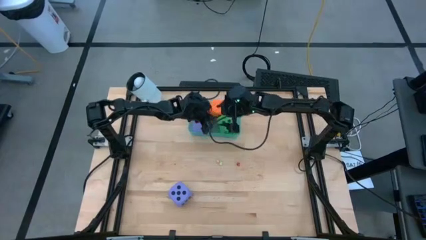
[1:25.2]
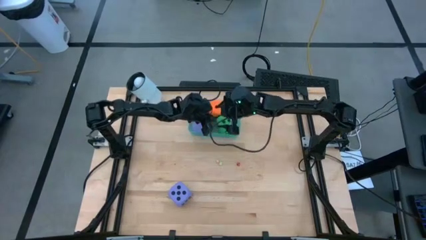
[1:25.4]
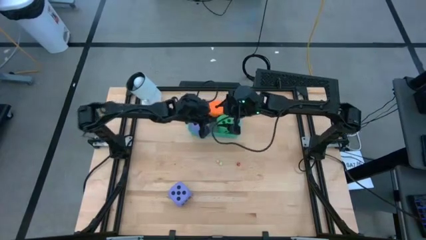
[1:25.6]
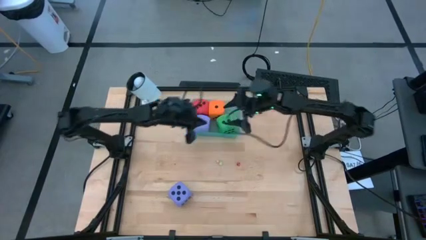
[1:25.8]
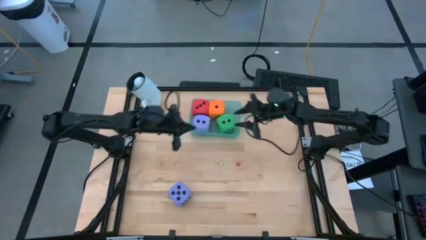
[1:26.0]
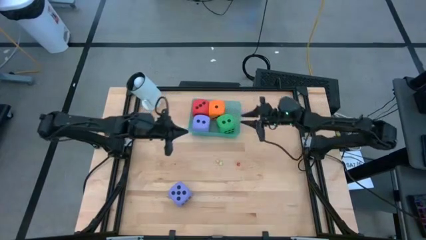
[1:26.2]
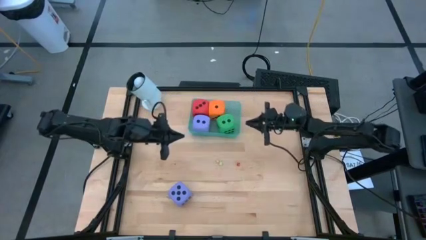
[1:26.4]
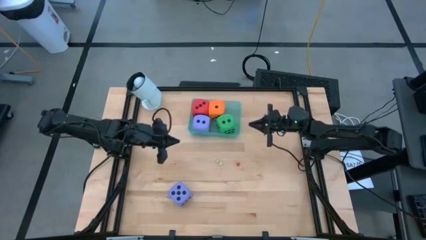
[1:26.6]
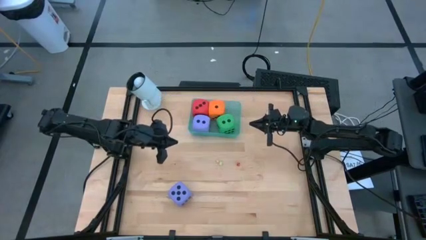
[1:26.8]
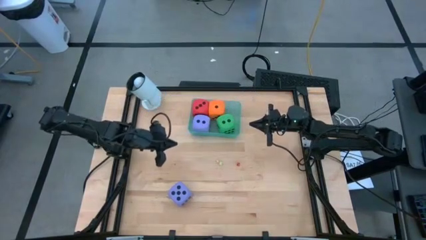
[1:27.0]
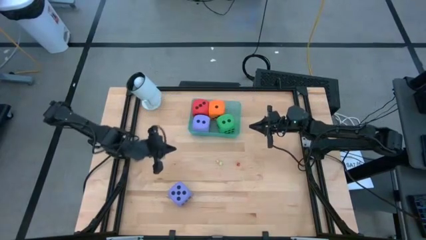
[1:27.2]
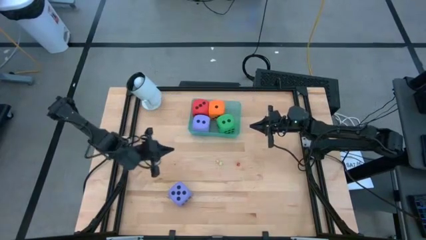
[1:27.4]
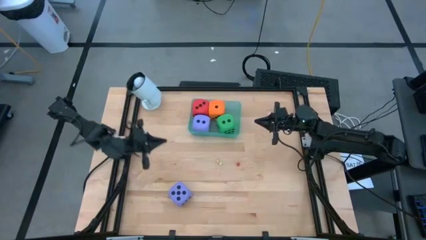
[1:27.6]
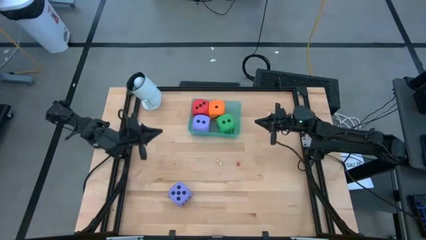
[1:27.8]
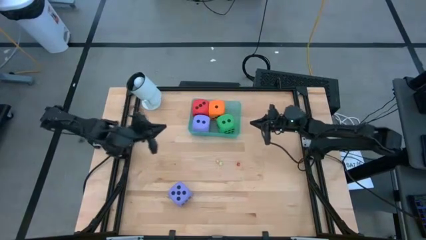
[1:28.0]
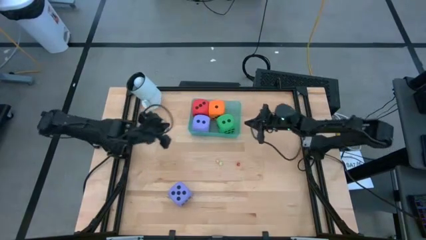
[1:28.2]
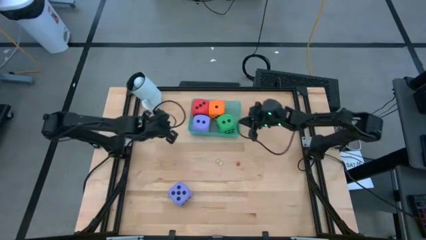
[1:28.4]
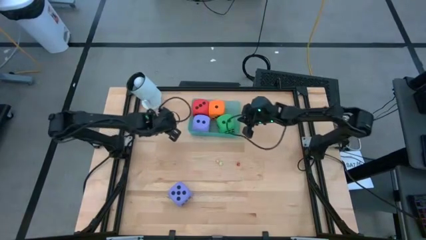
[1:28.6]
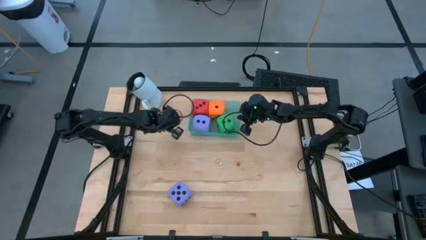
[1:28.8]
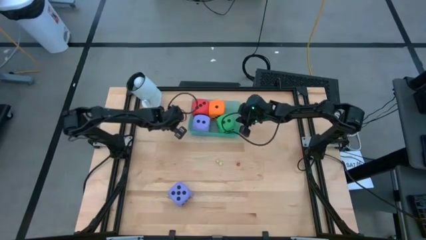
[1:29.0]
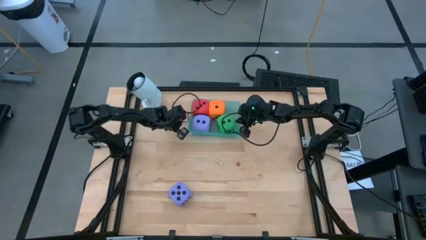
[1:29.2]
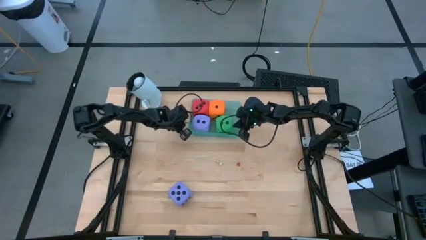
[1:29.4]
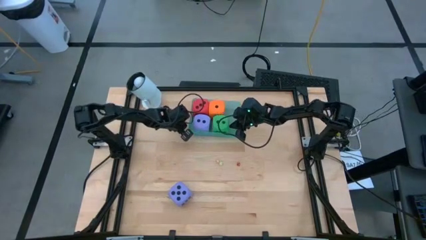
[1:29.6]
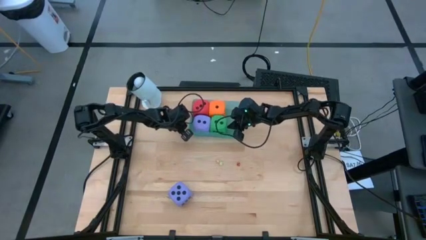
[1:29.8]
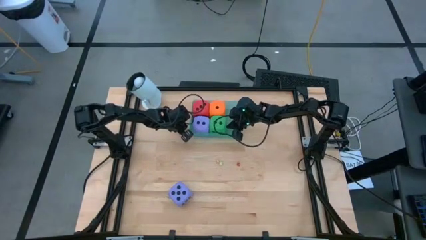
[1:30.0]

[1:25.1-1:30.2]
Task: Pick & Place Dice
Adjust the large green dice in the light blue bin

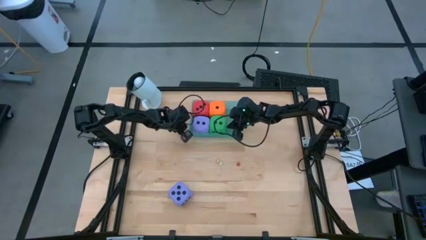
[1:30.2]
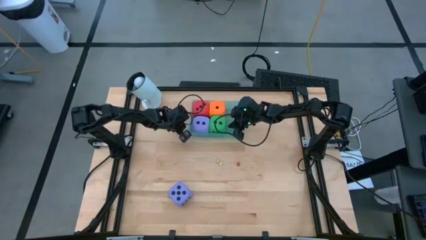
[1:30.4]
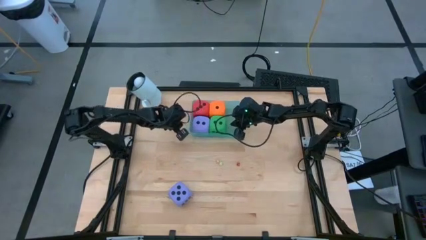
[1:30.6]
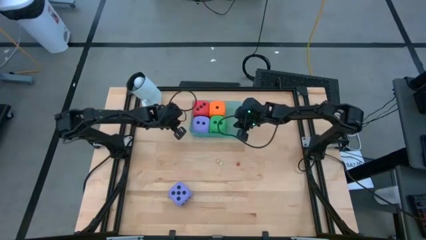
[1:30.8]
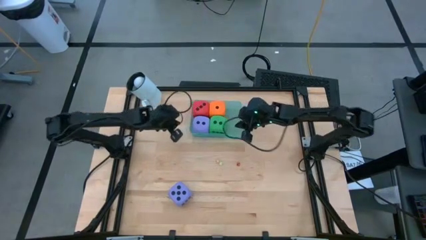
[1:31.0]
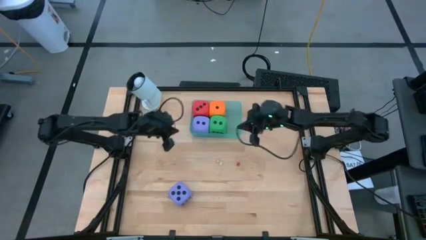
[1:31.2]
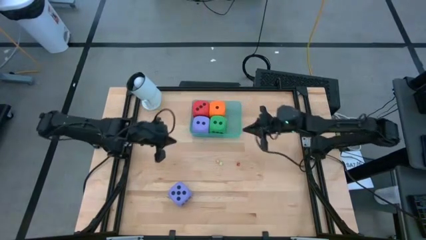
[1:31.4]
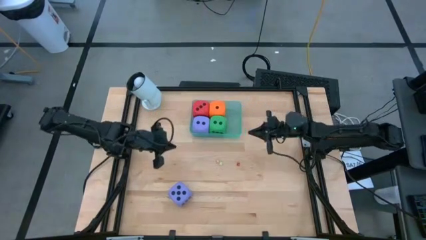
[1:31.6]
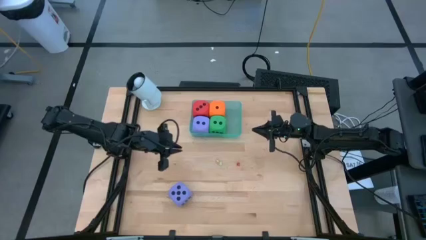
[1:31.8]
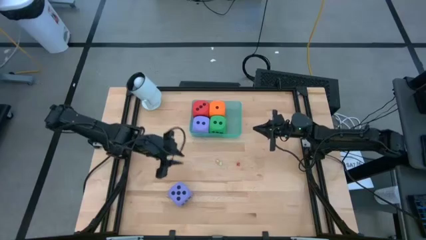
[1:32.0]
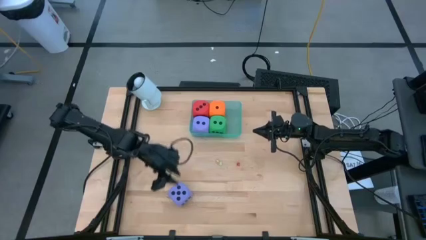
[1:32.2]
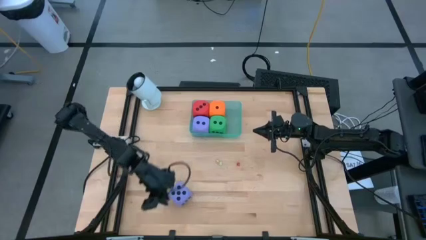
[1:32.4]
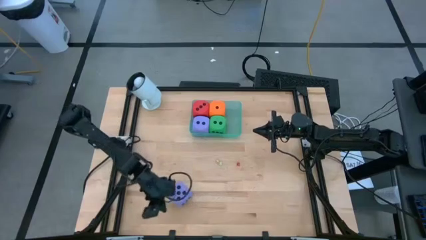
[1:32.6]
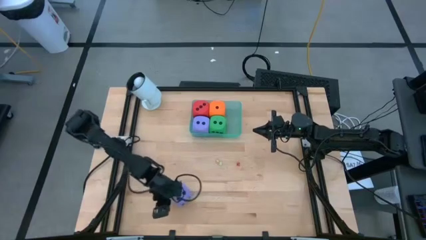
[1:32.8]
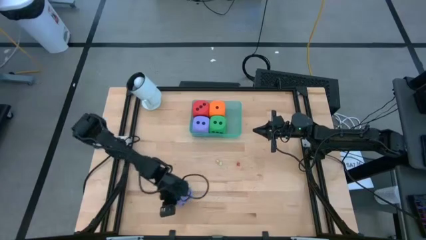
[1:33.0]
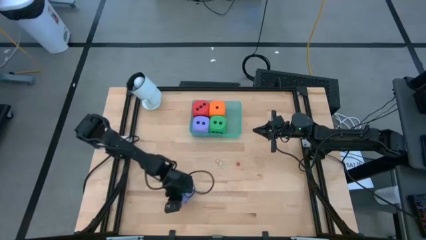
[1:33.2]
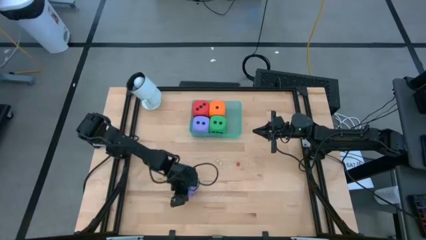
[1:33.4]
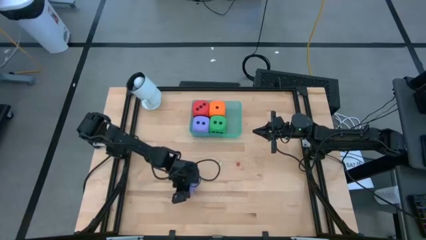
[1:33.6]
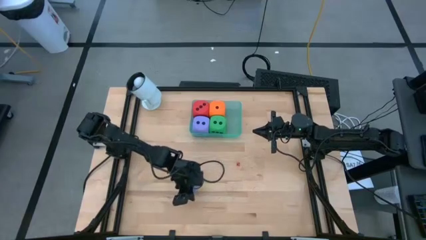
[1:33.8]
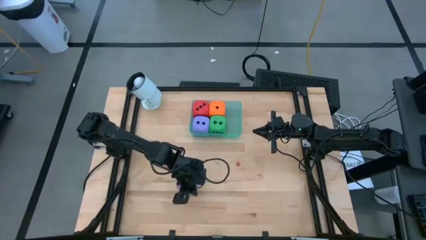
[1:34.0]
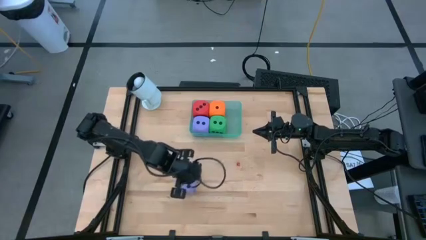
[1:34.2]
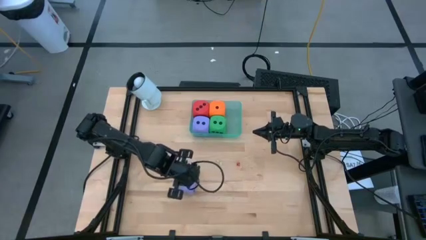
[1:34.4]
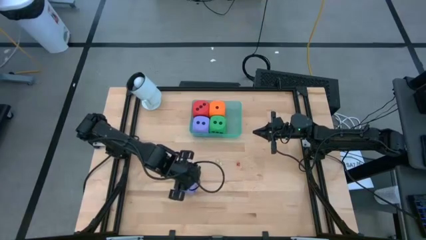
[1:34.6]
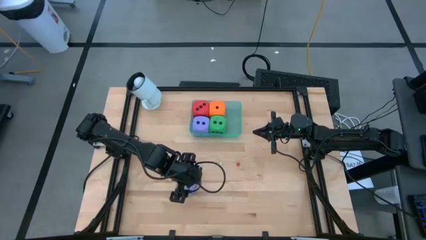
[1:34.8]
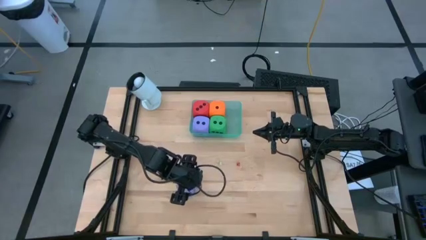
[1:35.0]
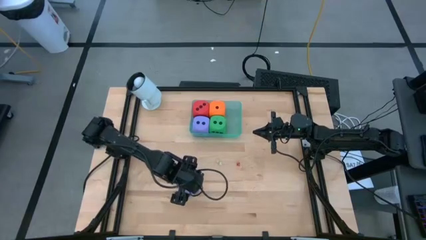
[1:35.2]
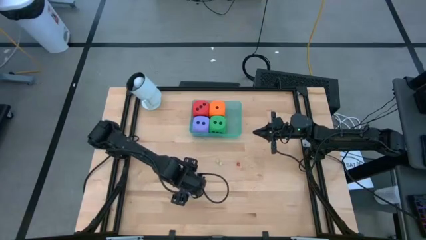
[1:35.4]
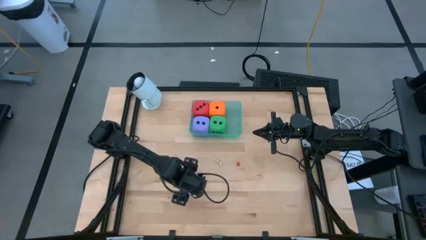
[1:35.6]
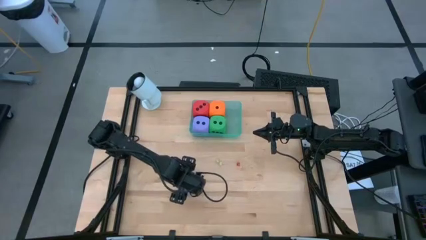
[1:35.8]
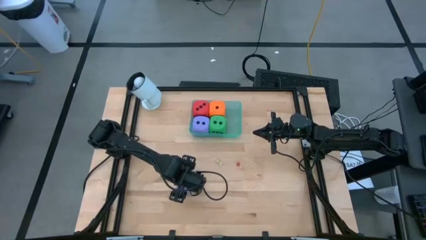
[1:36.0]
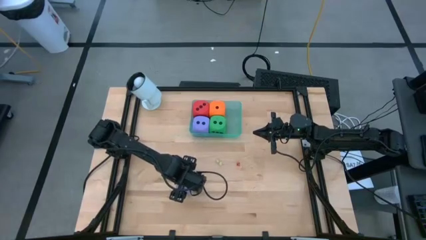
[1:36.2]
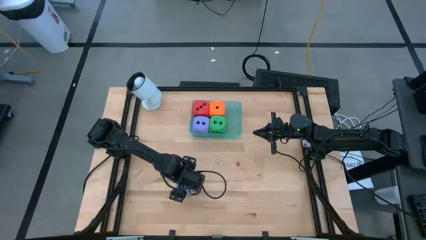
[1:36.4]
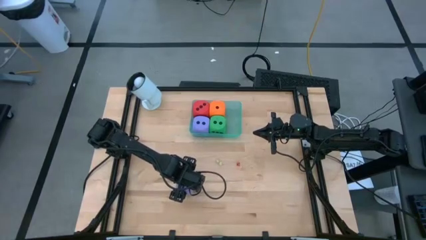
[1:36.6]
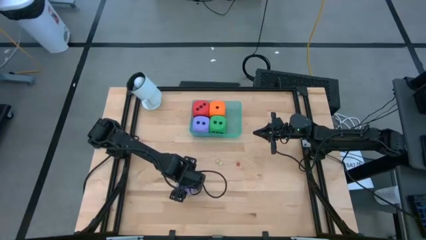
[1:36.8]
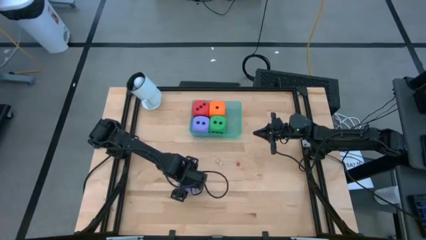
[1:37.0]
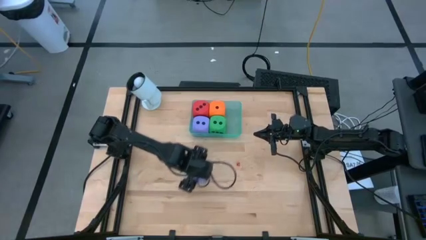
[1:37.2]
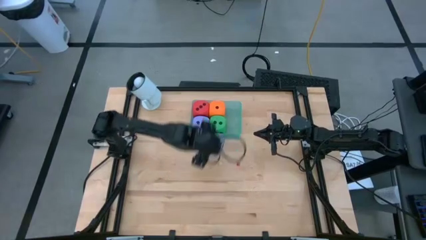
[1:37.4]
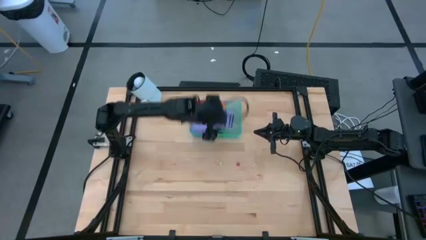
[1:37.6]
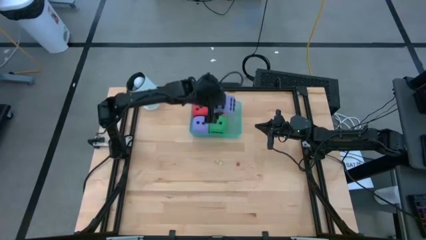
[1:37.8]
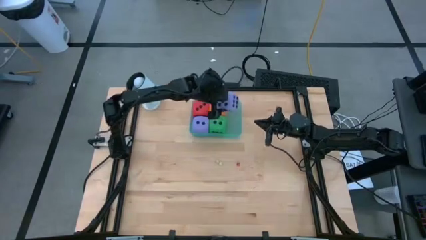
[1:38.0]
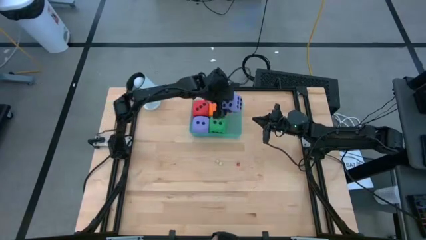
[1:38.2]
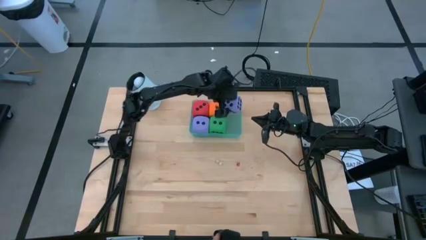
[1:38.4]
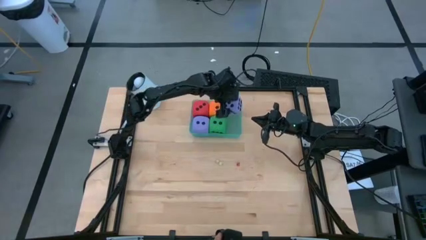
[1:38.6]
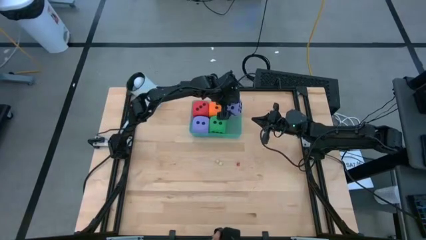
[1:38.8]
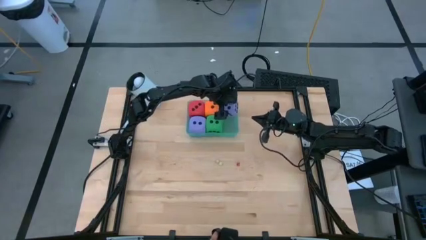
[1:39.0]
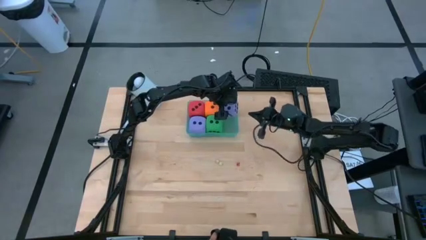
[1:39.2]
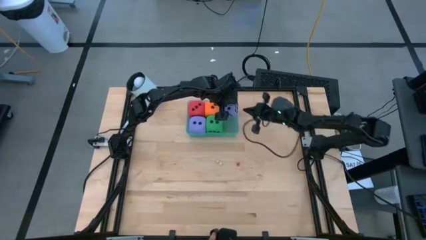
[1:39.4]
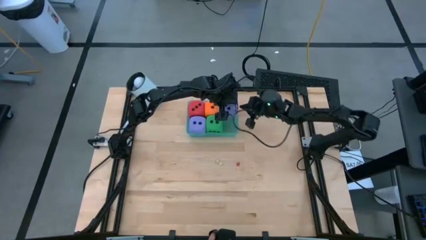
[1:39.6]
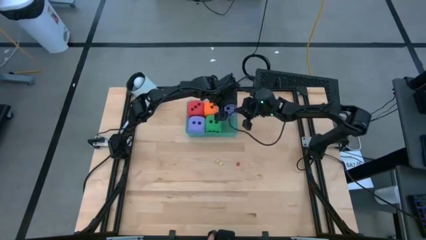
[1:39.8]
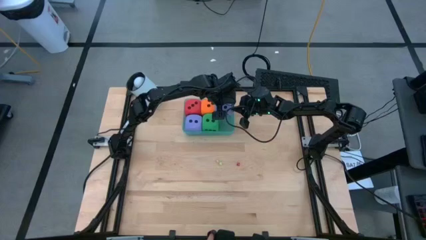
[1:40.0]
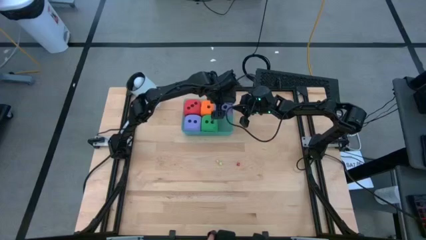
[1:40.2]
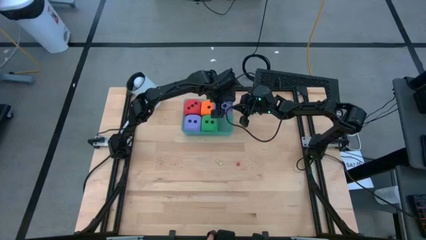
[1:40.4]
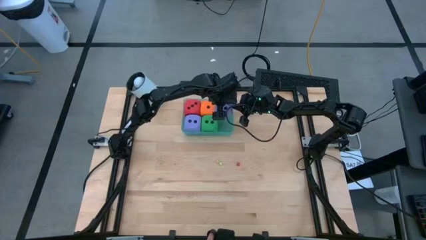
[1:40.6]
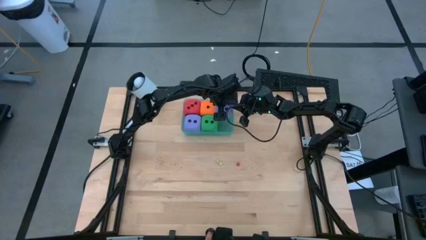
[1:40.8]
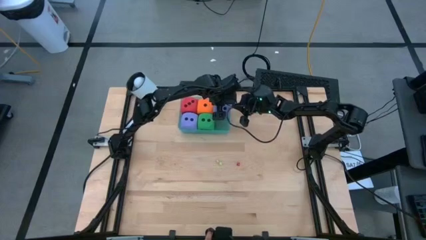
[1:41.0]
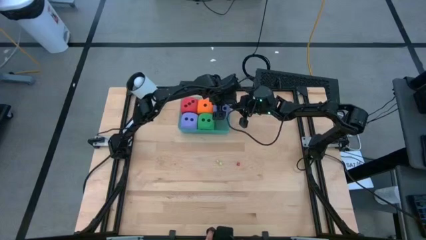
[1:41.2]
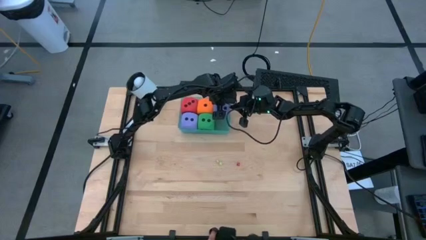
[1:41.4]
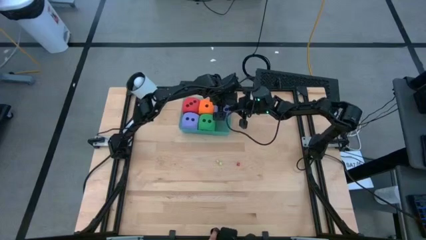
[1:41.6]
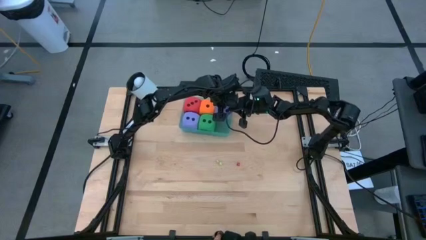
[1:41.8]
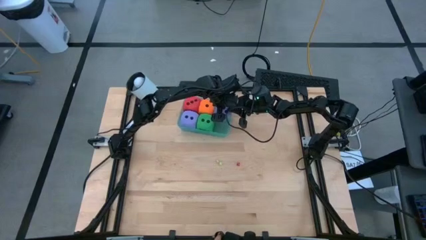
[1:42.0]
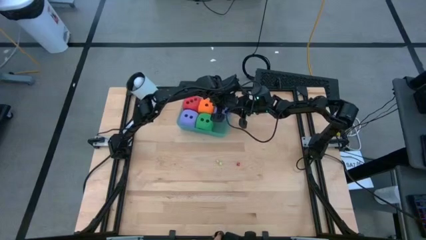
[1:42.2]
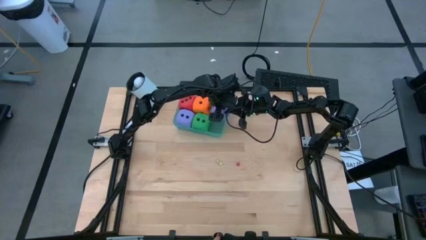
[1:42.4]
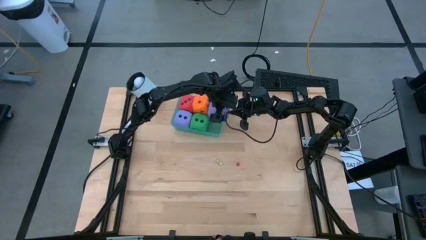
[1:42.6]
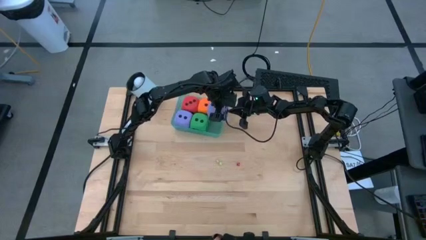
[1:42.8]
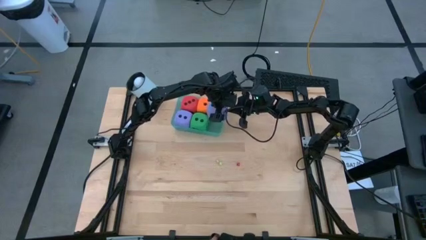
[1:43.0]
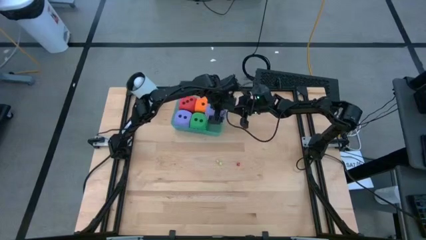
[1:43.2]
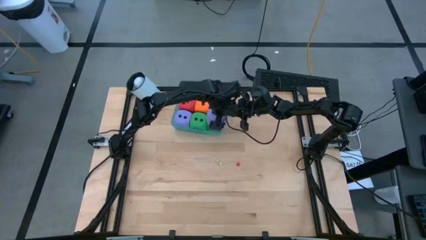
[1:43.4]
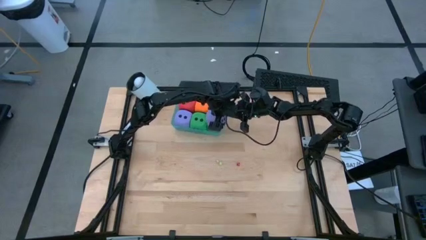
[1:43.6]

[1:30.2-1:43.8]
Put the large purple dice into the light blue bin
